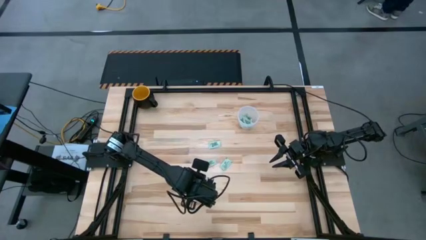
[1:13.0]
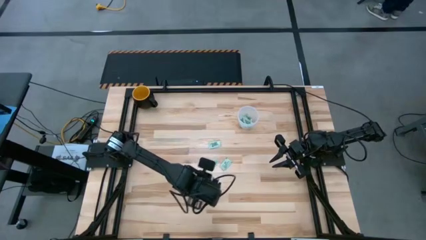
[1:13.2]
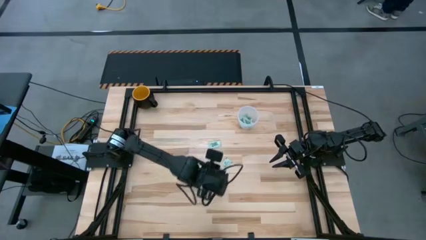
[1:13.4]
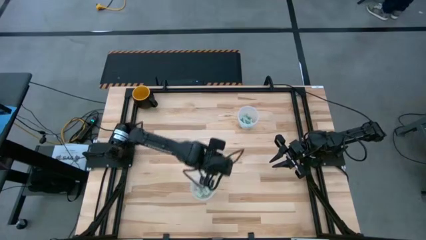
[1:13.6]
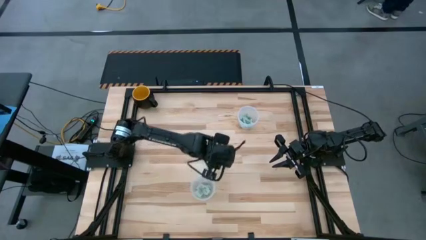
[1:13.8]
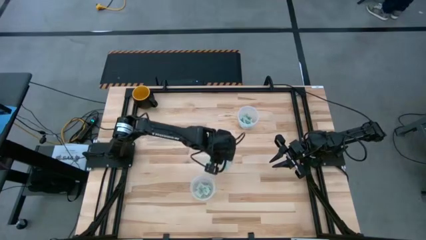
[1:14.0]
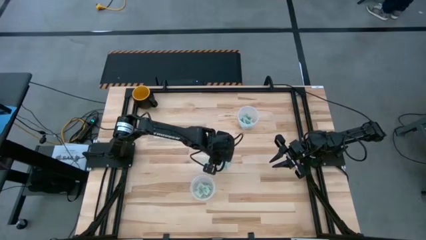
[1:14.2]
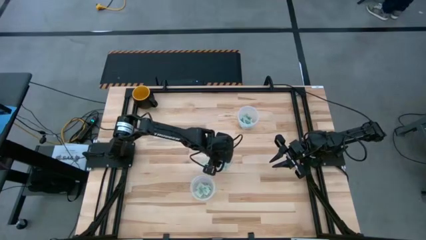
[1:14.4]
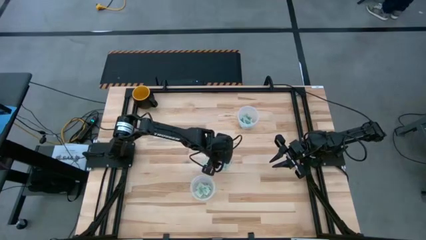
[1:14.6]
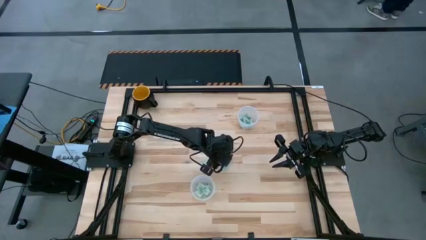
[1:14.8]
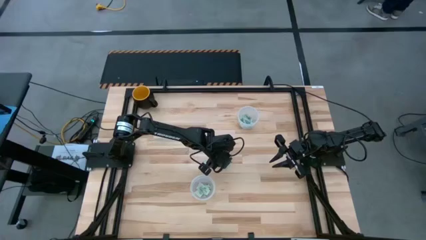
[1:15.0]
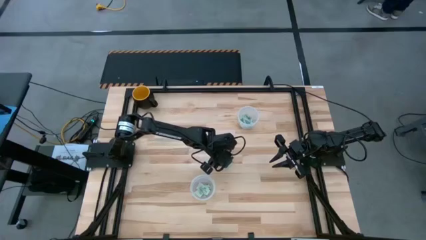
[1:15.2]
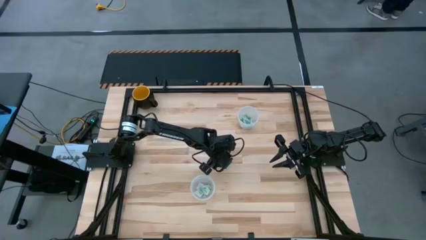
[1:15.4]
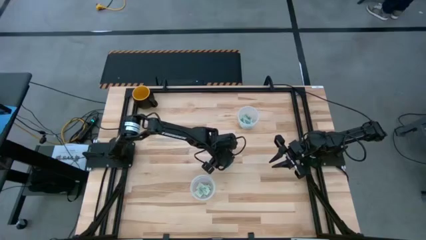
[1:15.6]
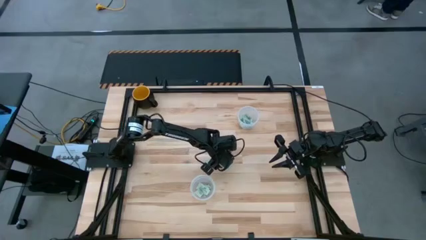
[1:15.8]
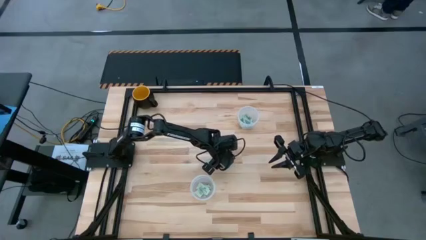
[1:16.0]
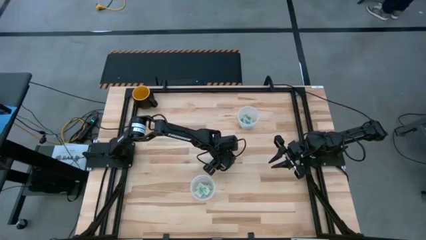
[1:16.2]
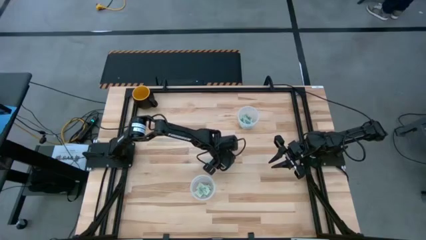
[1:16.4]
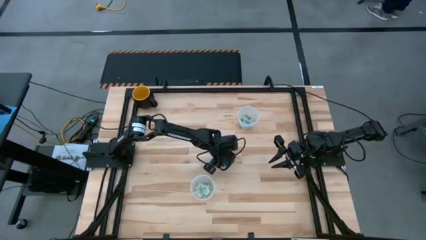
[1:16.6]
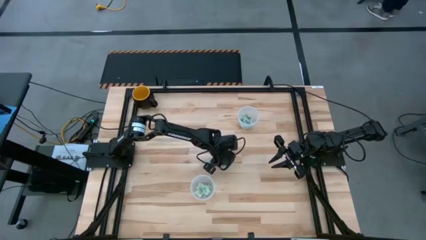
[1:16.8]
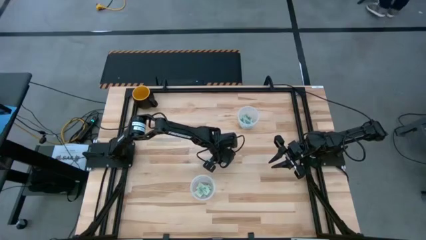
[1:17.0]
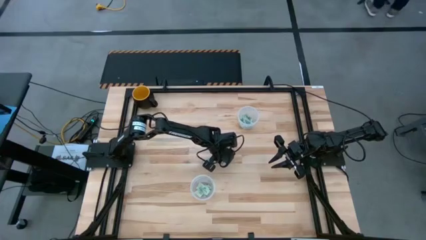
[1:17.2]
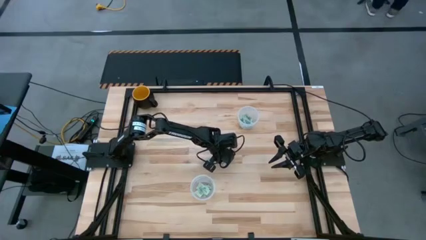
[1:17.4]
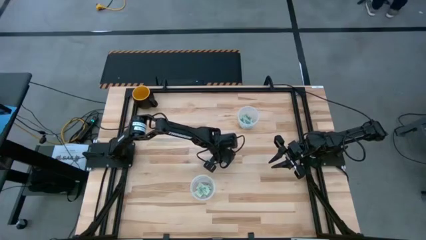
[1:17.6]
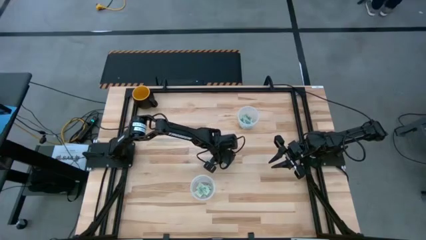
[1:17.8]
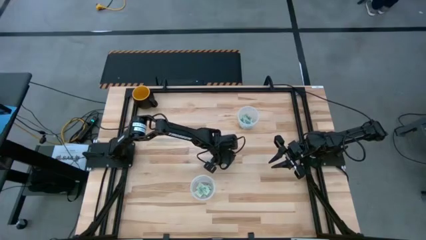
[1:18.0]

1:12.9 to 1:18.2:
Task: Pick and place Stevia / Truvia into bins
Put the stevia packet into the bottom transparent container

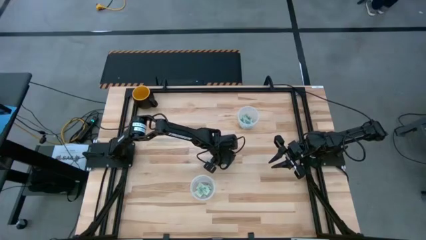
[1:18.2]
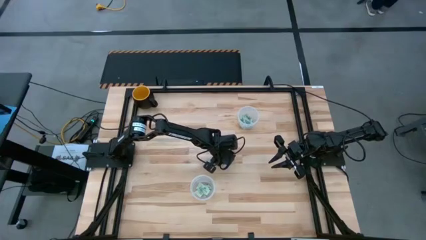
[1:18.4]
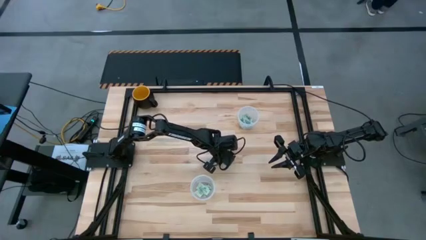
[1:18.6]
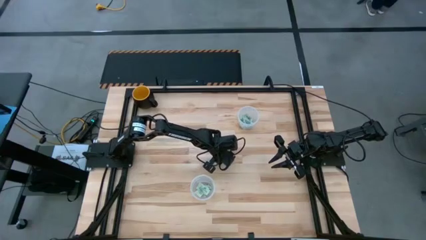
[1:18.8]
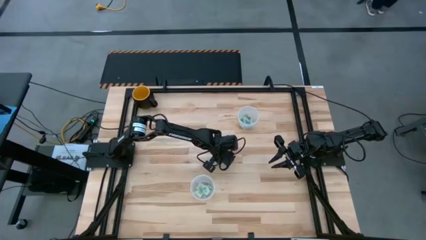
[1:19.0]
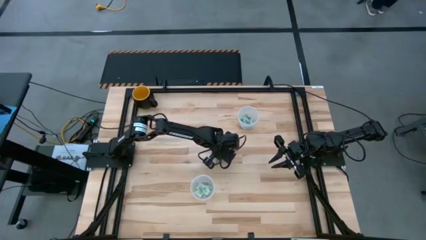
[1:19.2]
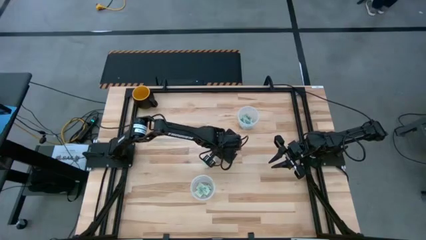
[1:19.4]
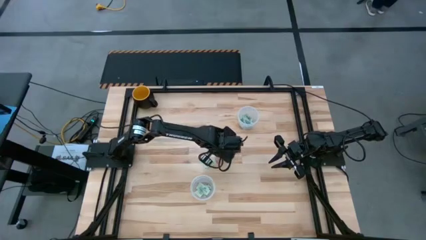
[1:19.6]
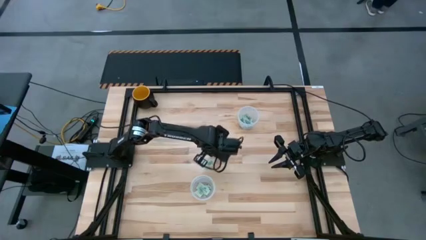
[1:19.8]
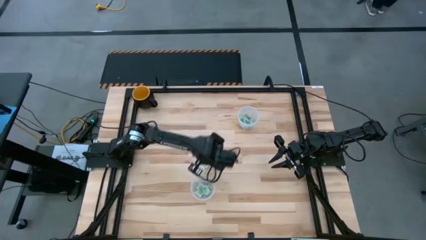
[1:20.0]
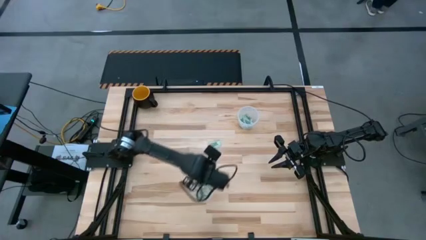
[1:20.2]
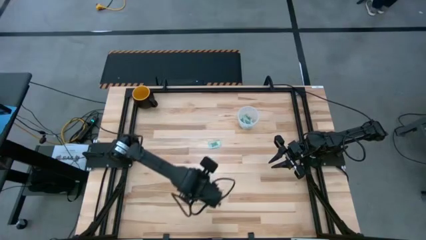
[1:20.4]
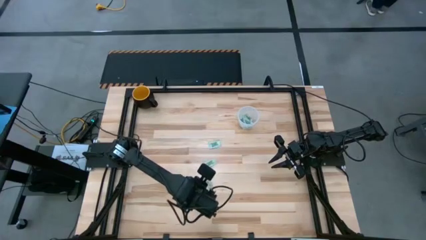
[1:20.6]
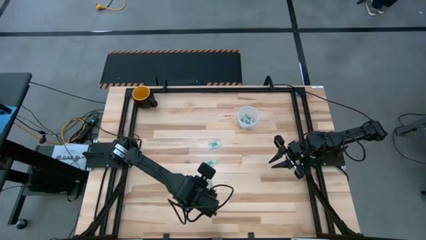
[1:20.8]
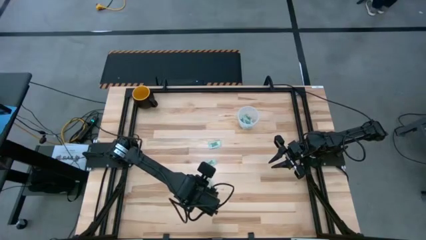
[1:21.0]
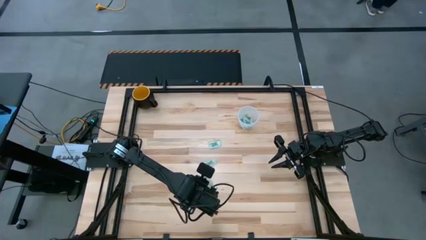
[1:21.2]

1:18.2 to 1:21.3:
Put the stevia packet into the bottom transparent container

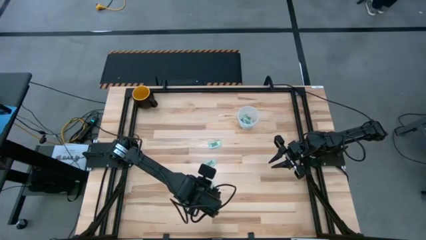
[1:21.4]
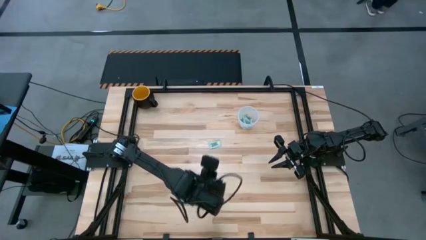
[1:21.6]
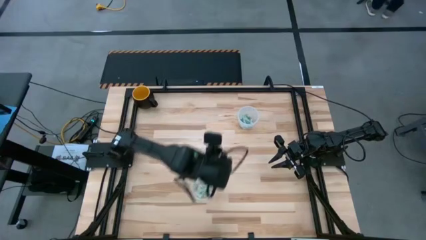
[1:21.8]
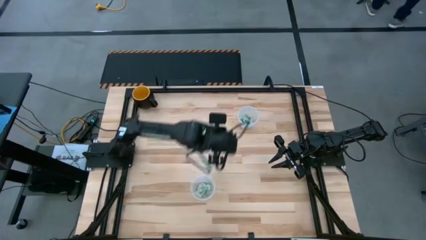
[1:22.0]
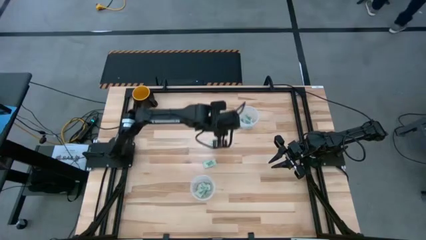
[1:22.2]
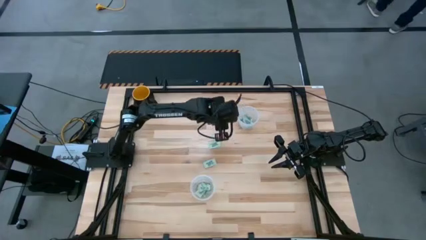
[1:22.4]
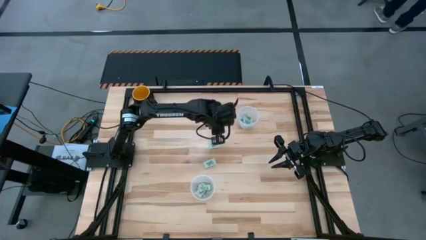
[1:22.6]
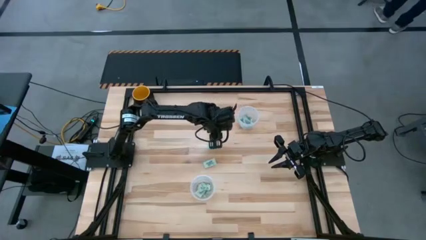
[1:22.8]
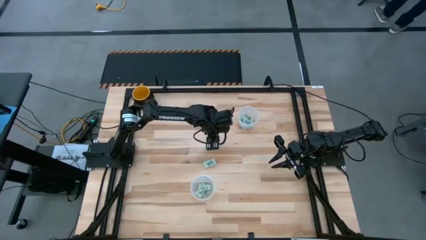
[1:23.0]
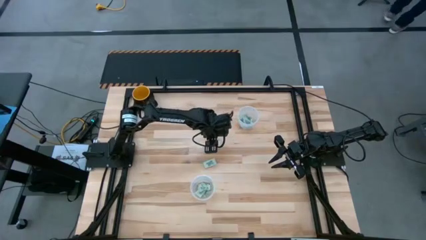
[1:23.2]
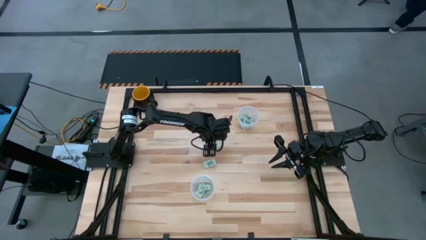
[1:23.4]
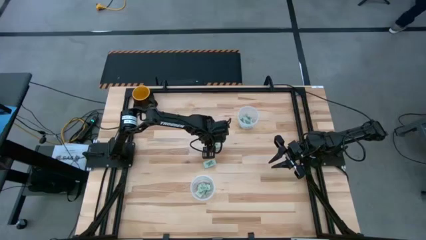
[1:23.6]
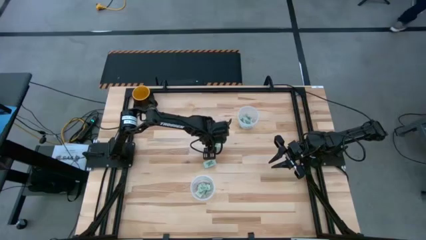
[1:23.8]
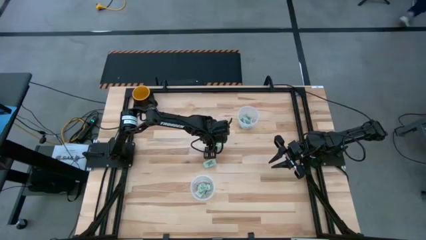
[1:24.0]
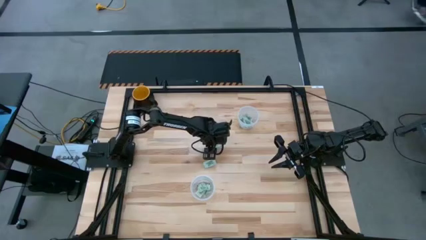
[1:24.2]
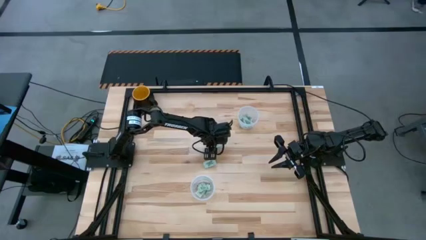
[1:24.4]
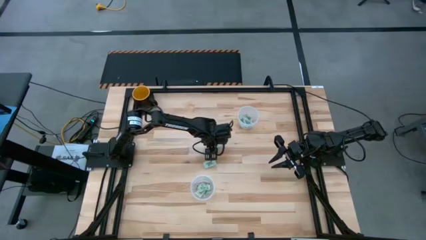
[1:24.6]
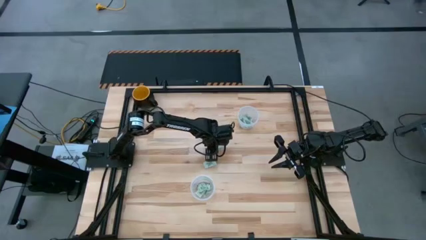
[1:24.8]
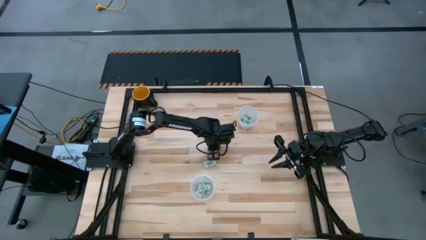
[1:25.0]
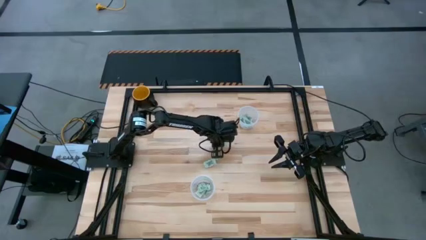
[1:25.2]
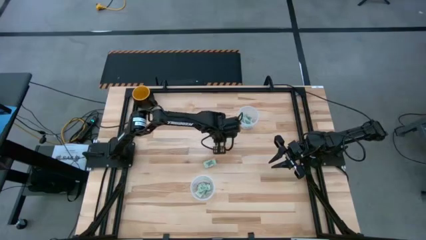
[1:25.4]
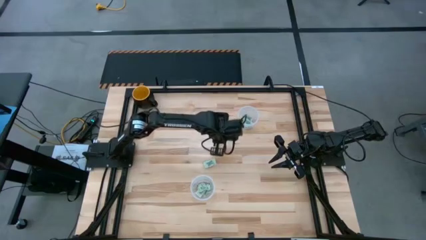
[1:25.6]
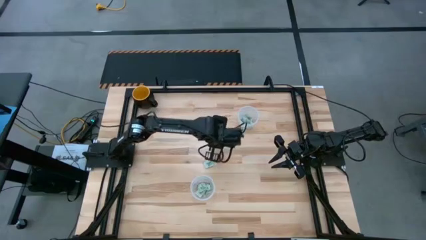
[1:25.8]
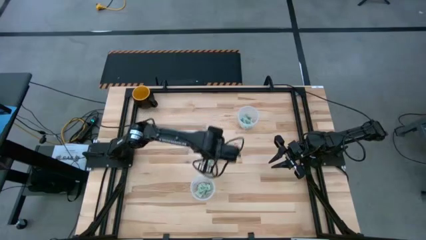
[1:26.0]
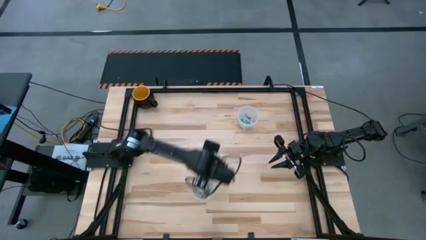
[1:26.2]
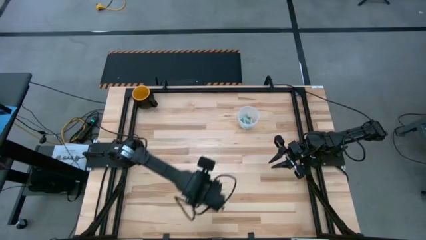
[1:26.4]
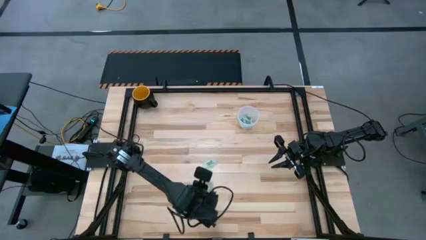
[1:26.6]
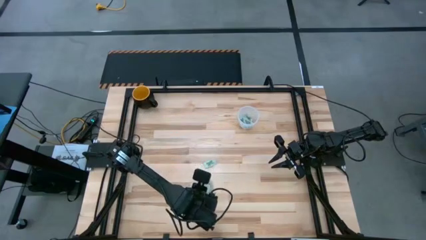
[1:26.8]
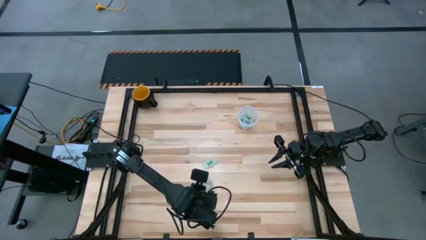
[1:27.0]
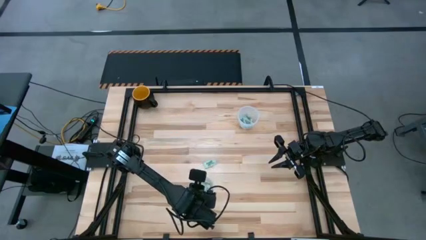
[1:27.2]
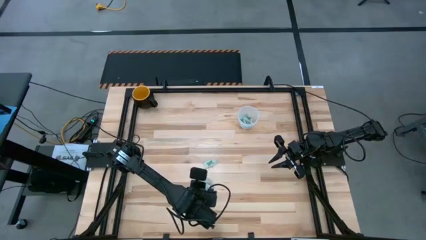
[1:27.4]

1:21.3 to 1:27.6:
Put the stevia packet into the bottom transparent container
